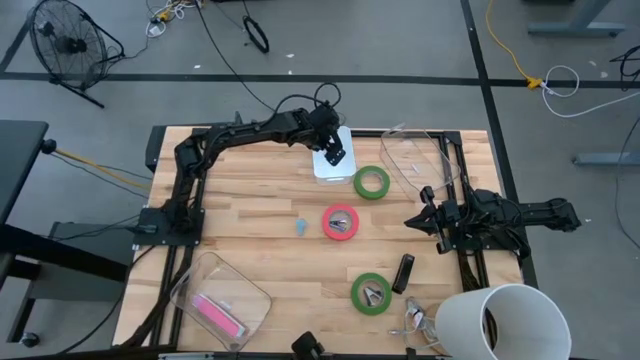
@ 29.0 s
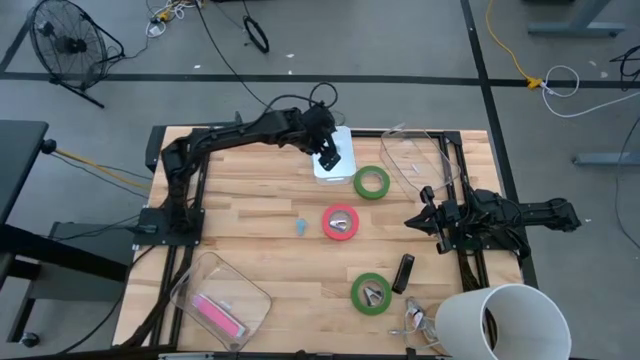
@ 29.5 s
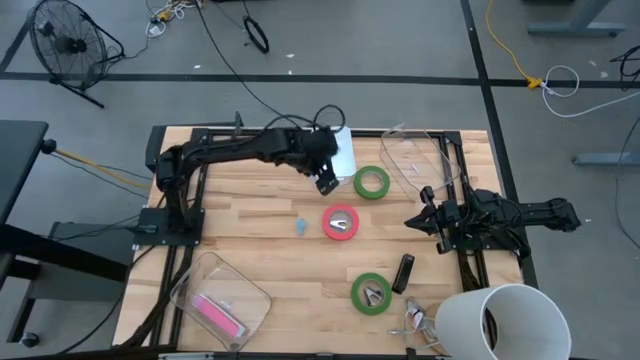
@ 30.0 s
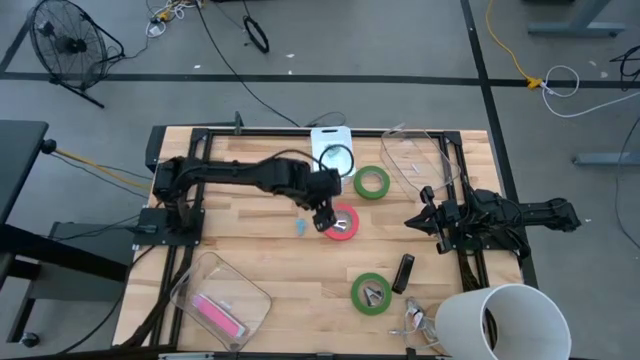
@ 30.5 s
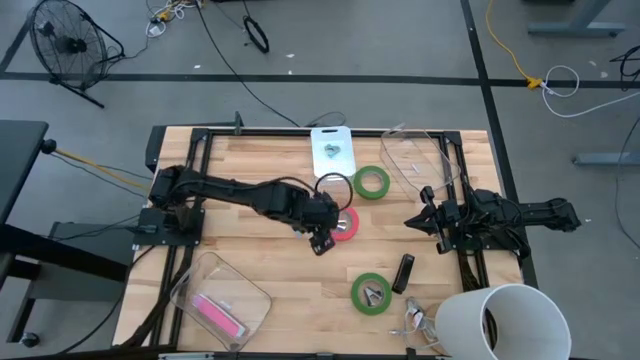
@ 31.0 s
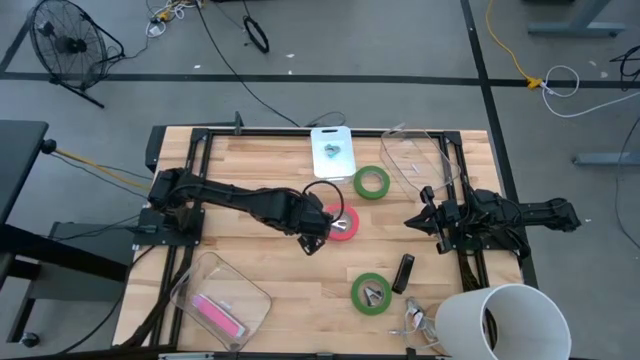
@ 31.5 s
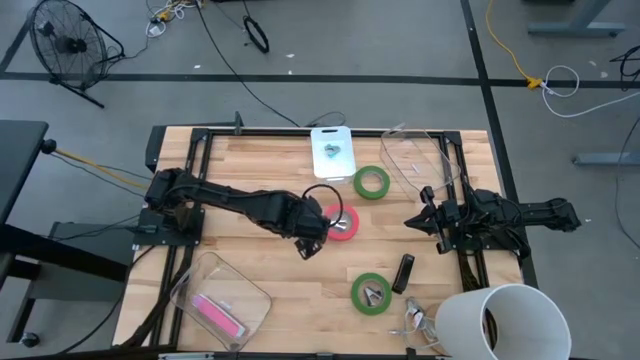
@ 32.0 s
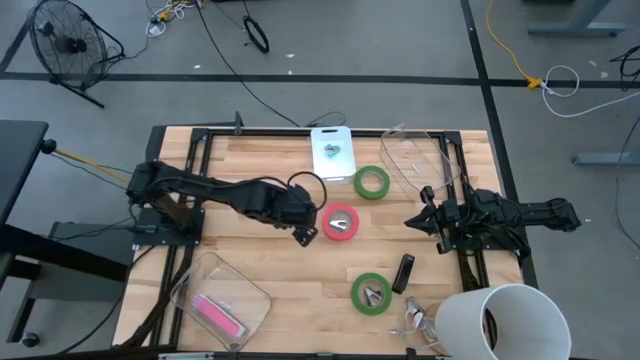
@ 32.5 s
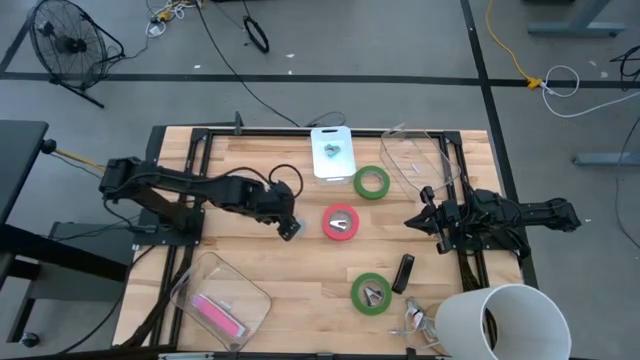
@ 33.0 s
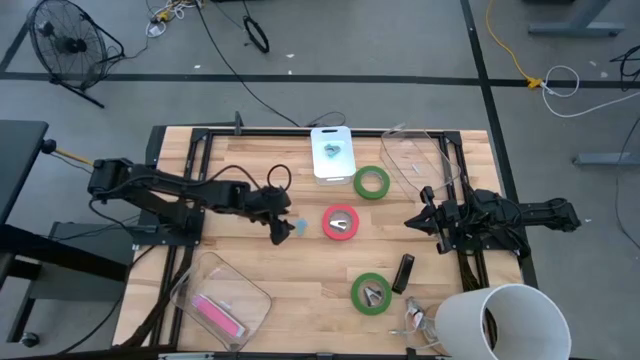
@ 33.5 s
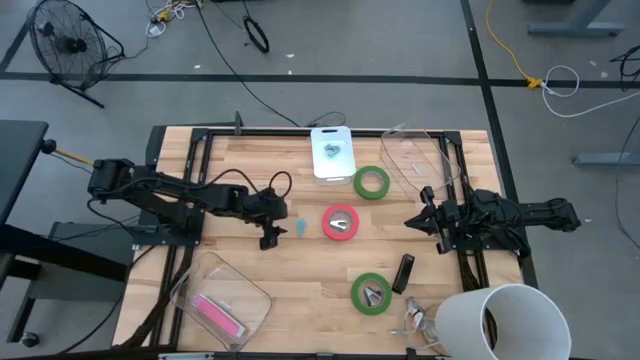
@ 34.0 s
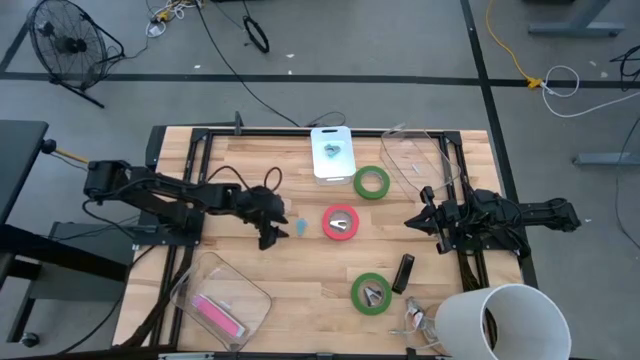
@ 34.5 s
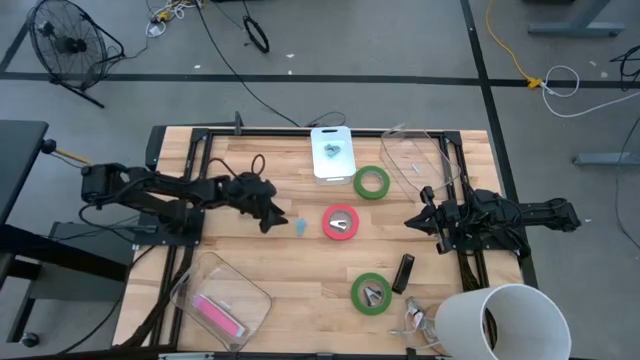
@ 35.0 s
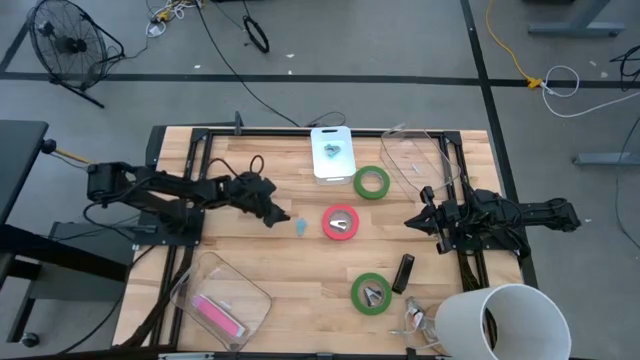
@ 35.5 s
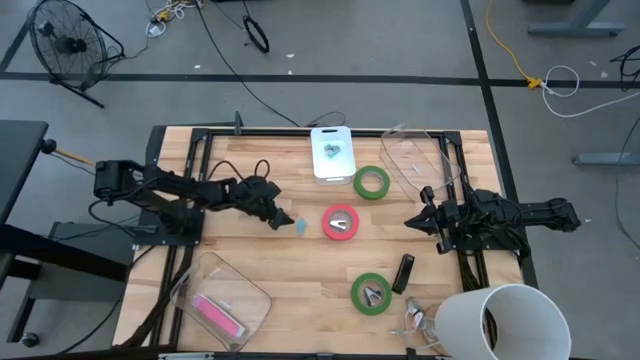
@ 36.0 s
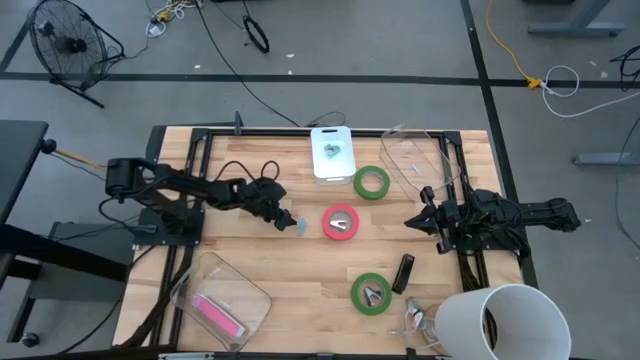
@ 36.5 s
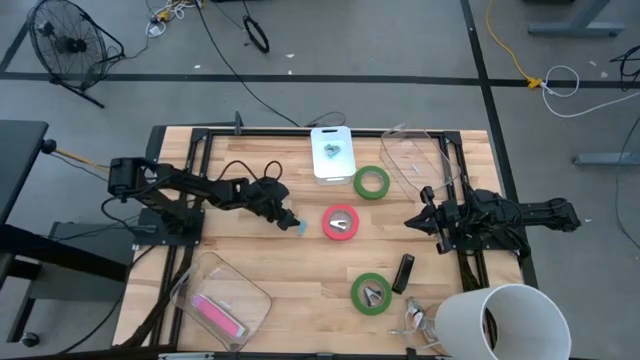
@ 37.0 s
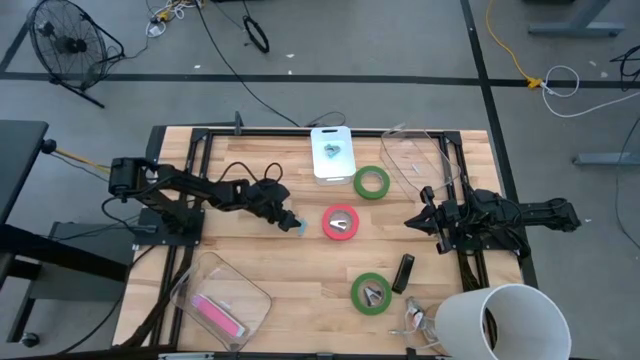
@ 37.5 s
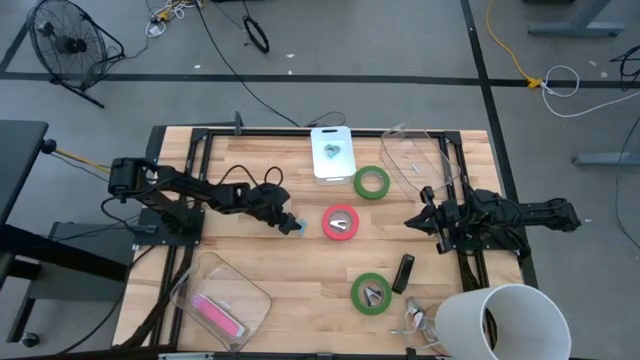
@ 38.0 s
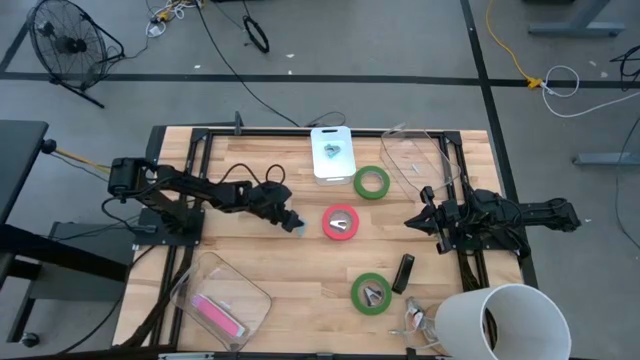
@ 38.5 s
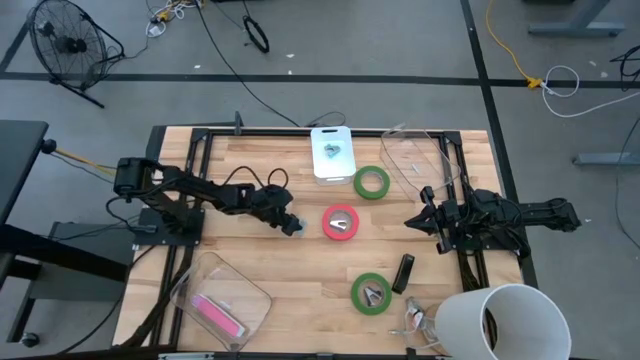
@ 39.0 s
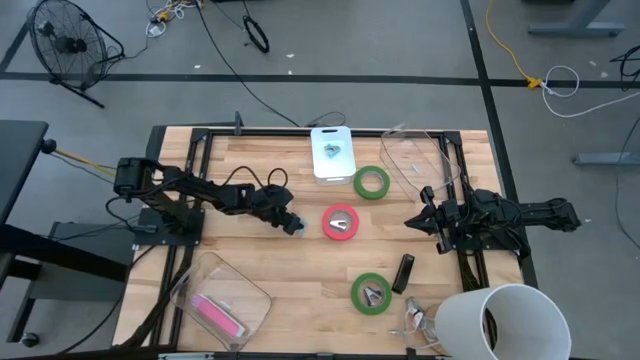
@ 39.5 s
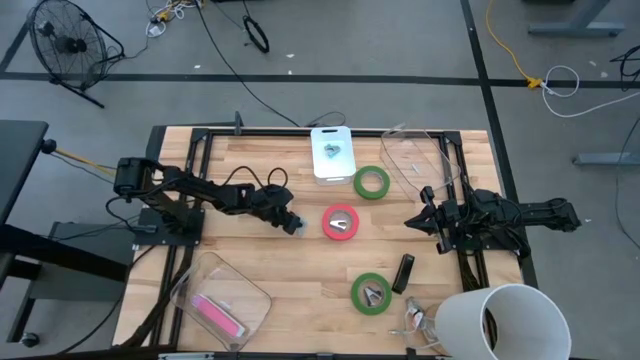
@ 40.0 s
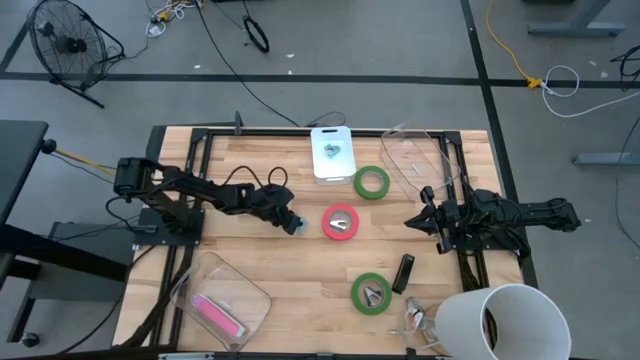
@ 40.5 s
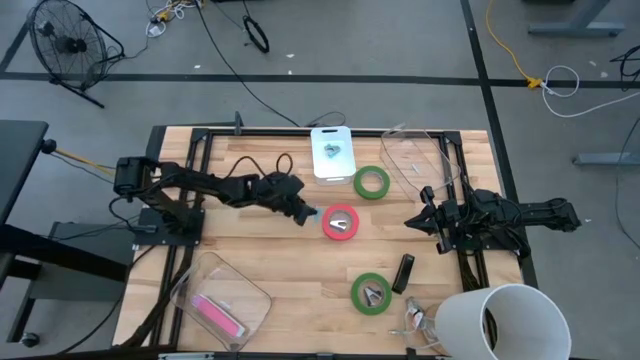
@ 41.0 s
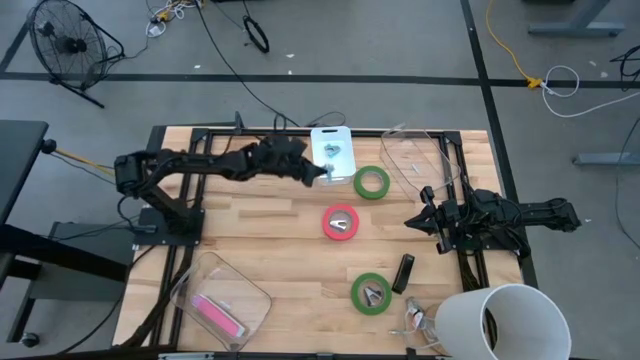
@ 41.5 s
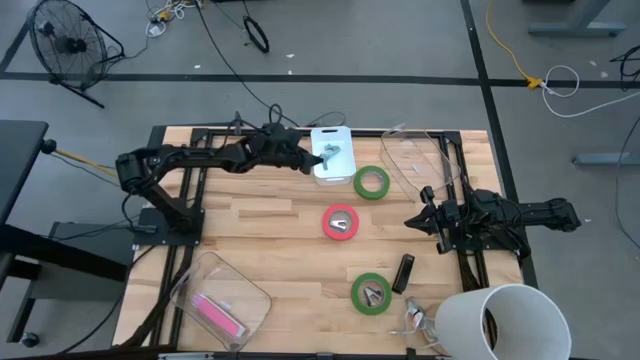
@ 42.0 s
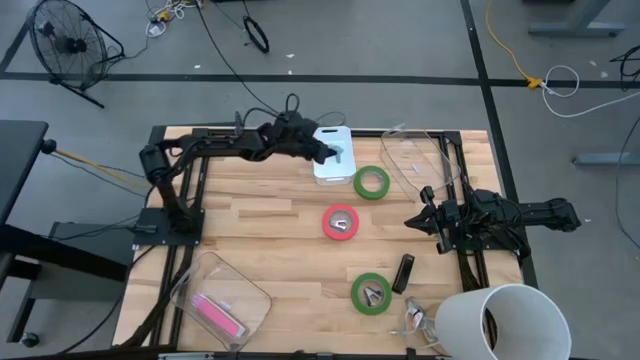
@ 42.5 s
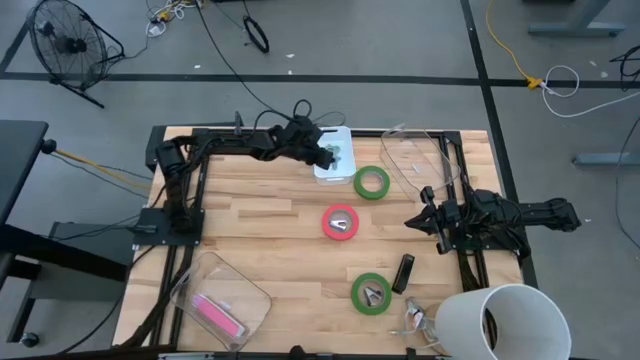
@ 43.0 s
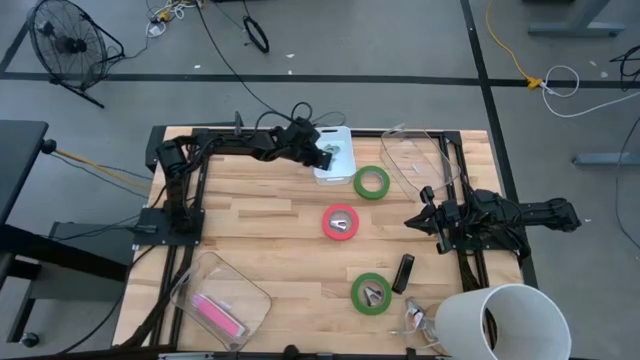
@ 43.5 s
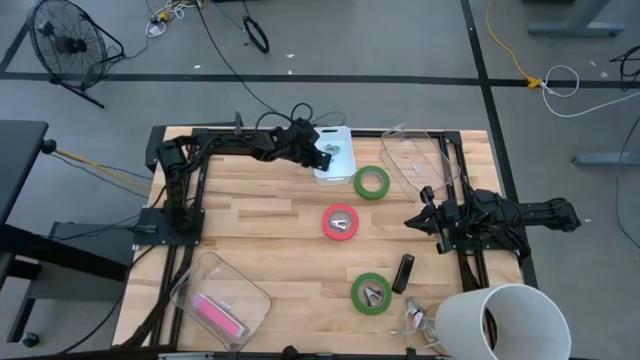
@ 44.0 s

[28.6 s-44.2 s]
Task: Pick and place Stapler, Stapler remover, tape
Put the gray staple remover into the white bin

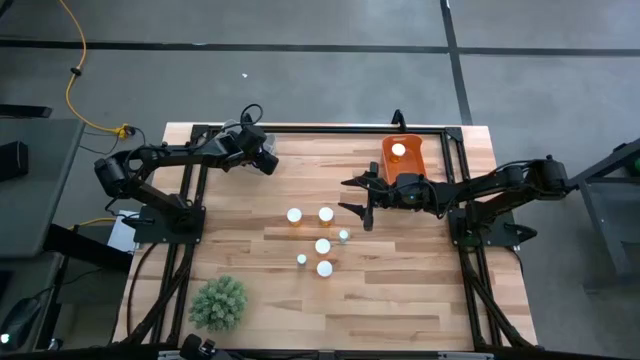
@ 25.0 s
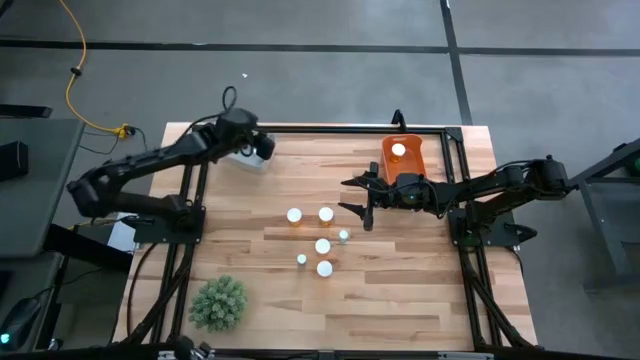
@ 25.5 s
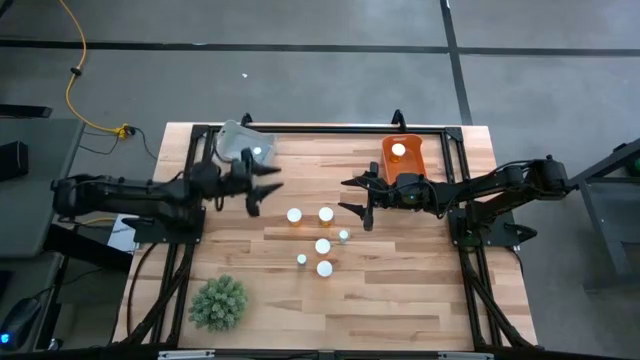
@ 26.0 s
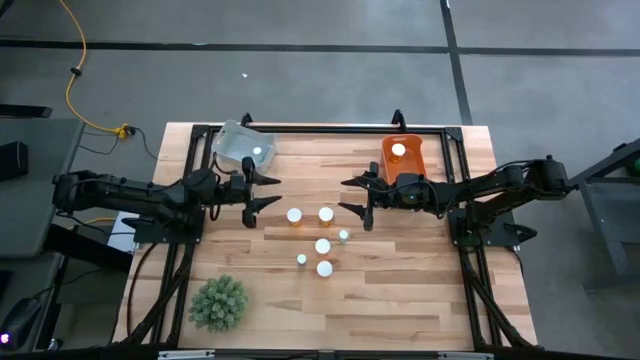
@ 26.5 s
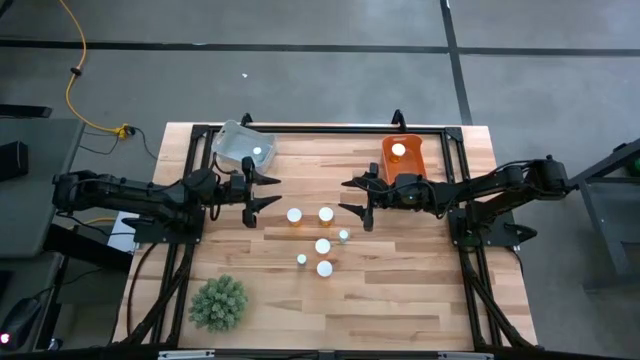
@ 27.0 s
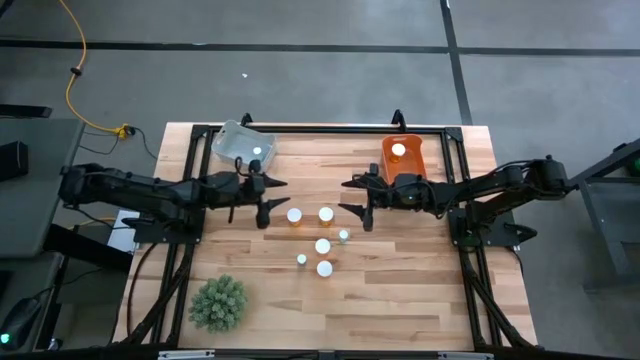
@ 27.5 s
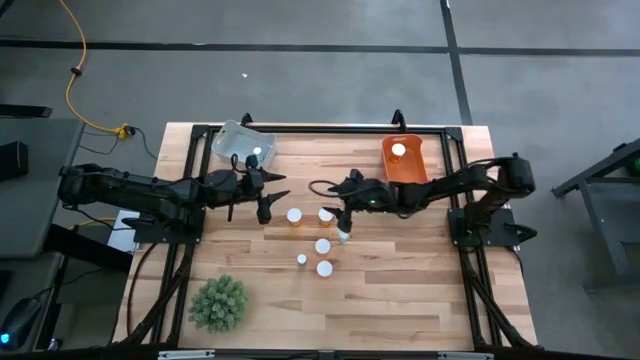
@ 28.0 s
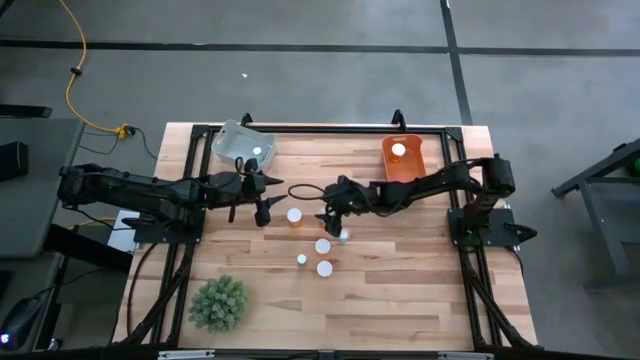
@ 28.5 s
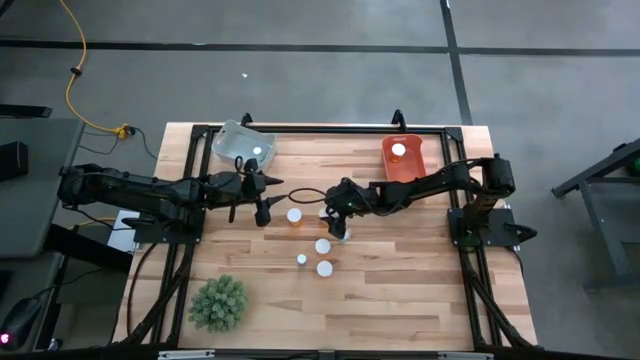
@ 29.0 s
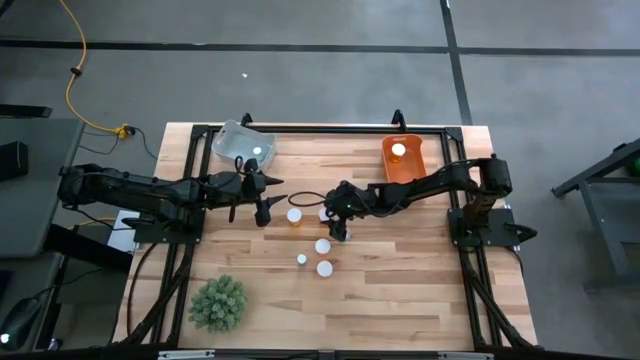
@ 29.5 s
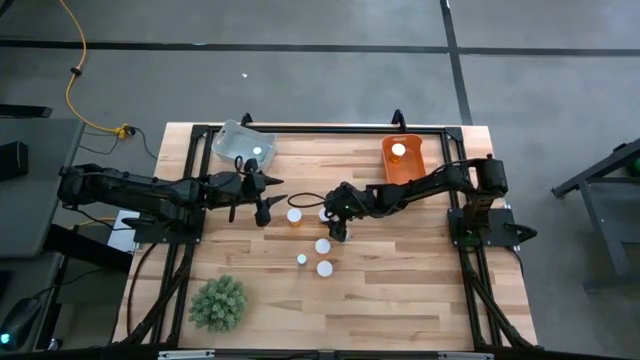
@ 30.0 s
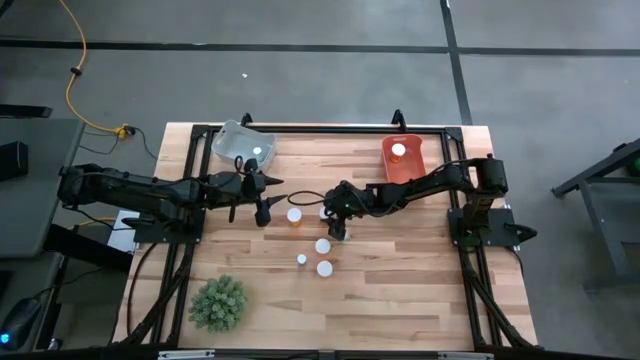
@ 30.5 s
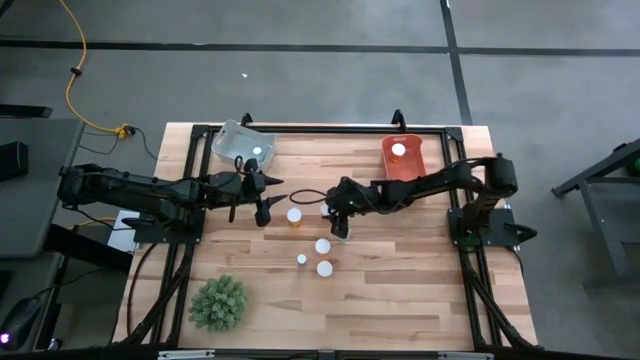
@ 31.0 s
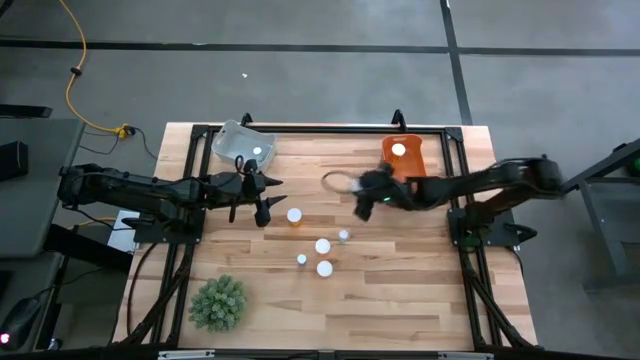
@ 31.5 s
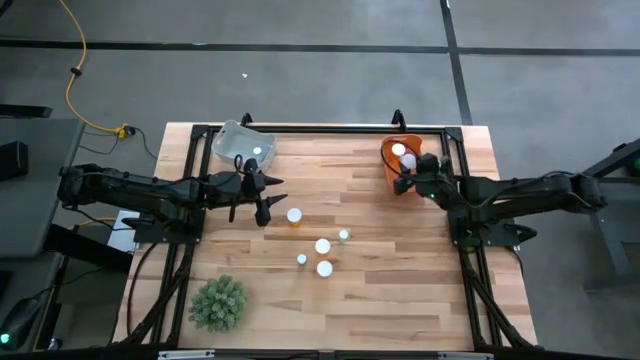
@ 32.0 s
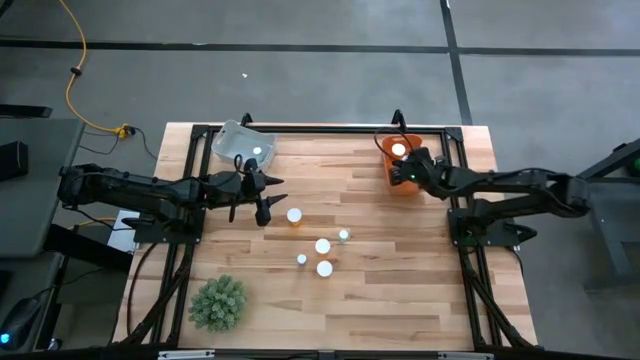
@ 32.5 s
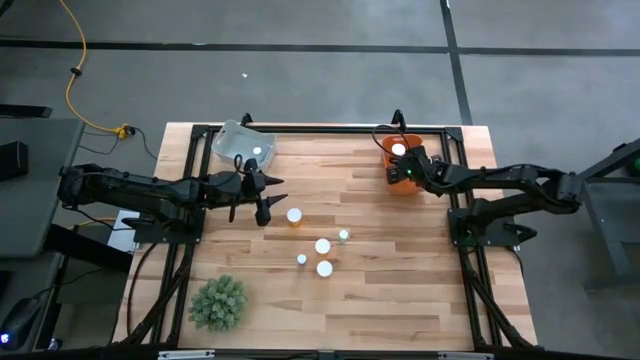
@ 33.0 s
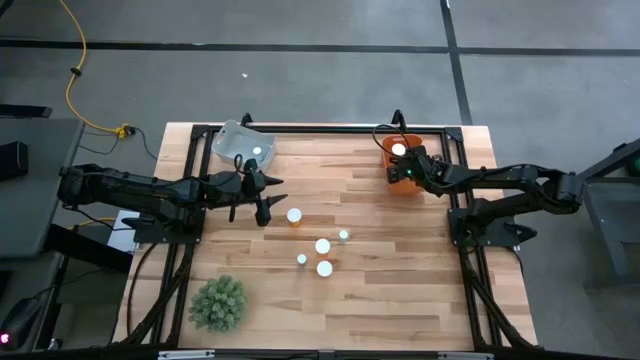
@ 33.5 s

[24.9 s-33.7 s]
Task: Pick and place medicine bottles into bin by pill shape (circle, oval)
Put the orange capsule bottle into the orange bin
